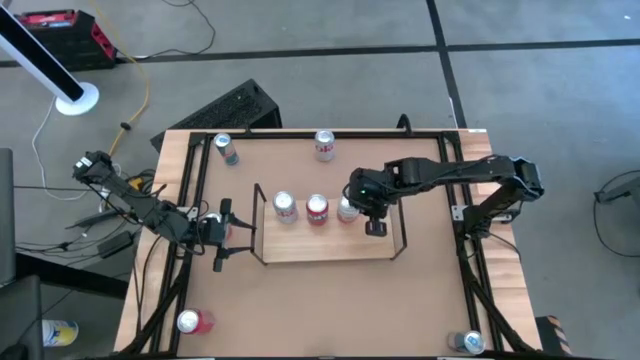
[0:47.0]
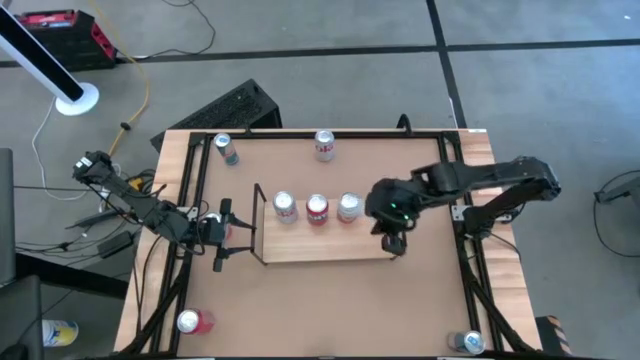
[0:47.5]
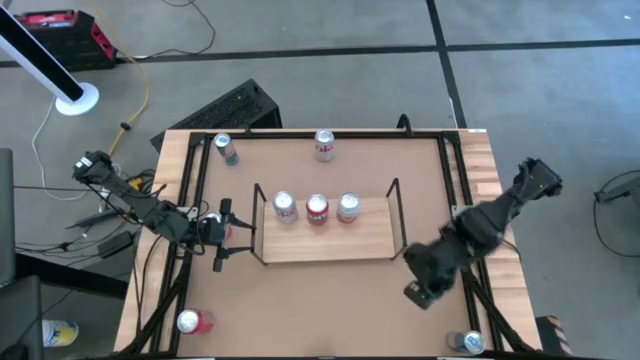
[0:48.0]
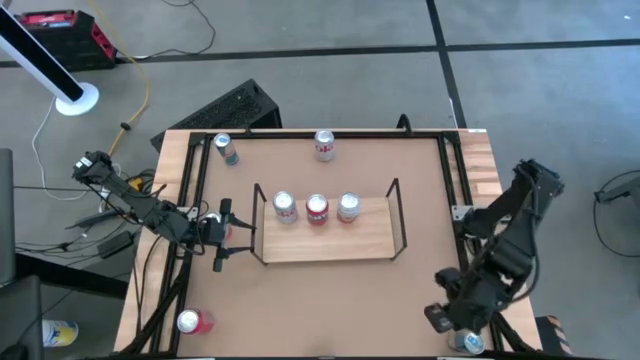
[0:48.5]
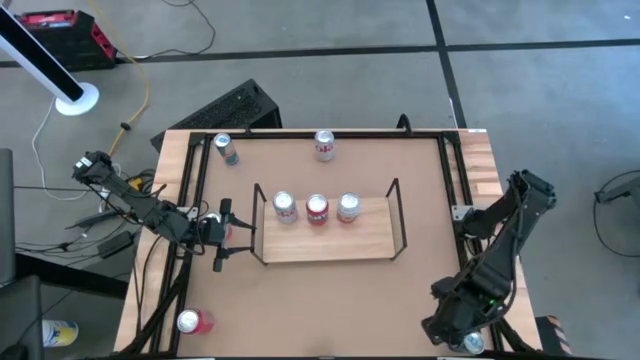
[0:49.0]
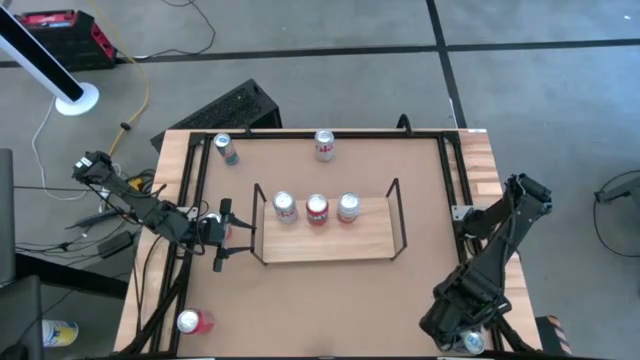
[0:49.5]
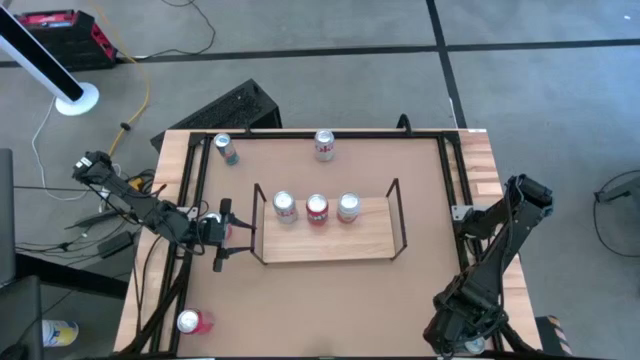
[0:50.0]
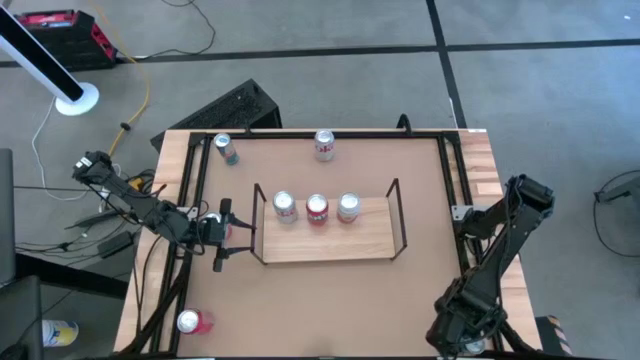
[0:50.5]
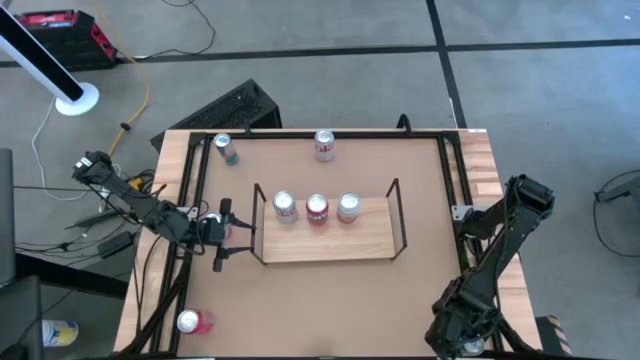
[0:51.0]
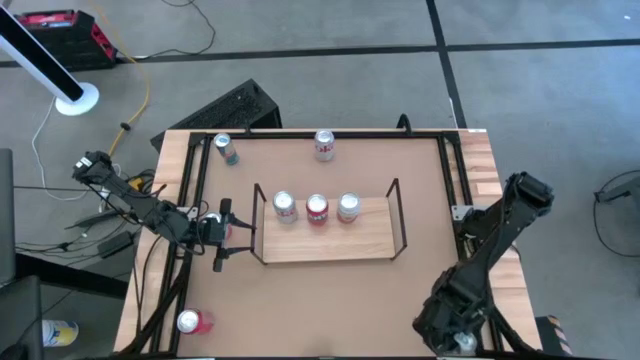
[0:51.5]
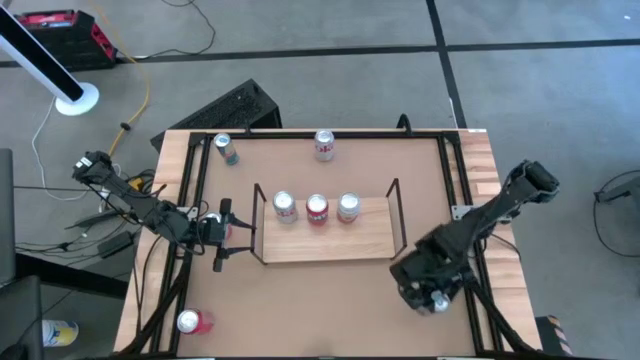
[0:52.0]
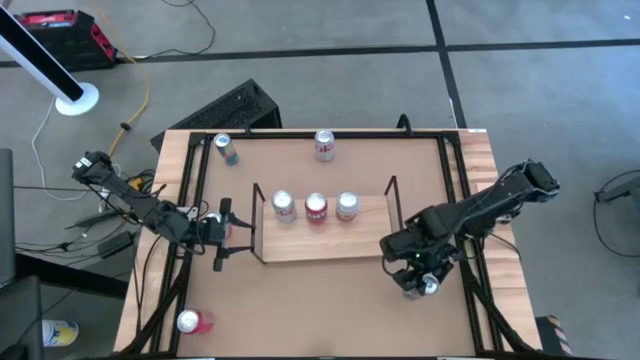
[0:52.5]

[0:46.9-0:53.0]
Task: Place canned beverage on shelf
Put the bottom blue soda can on the shelf aligned with the other pink soda can

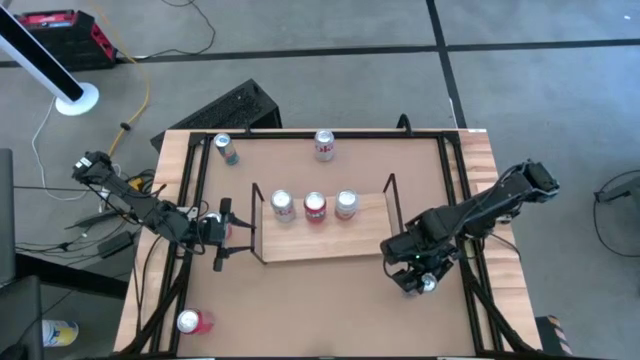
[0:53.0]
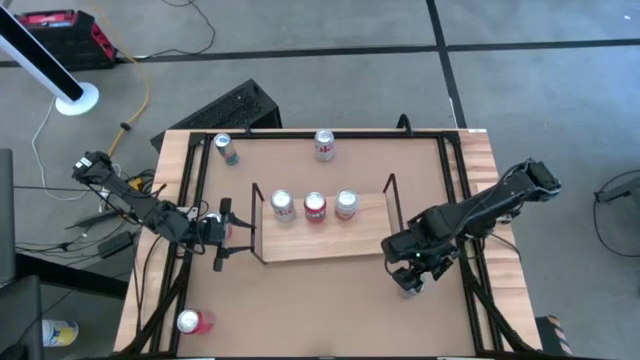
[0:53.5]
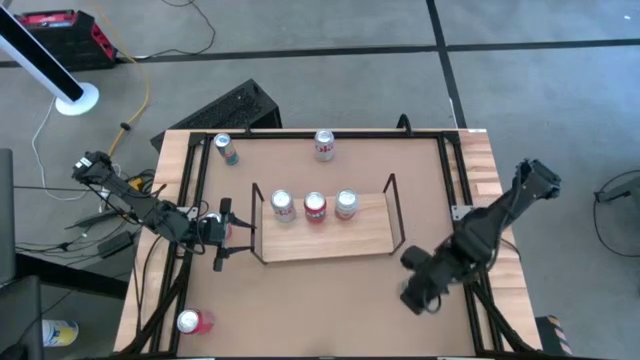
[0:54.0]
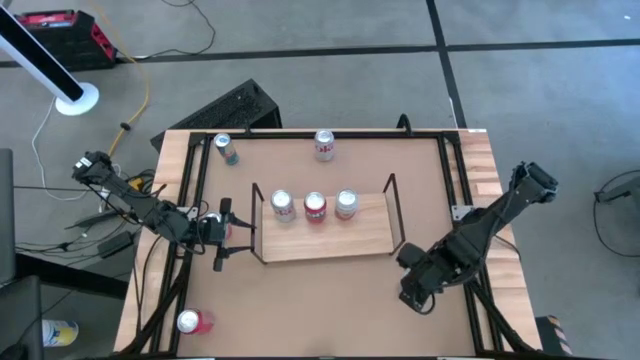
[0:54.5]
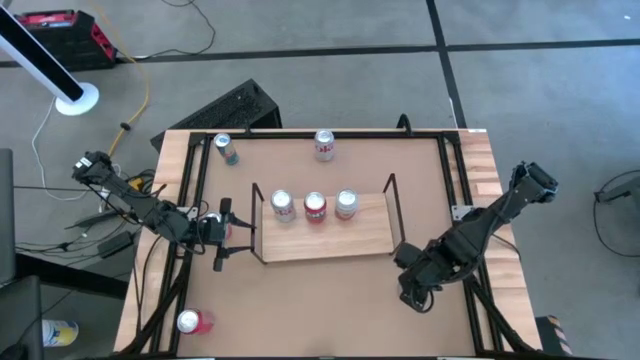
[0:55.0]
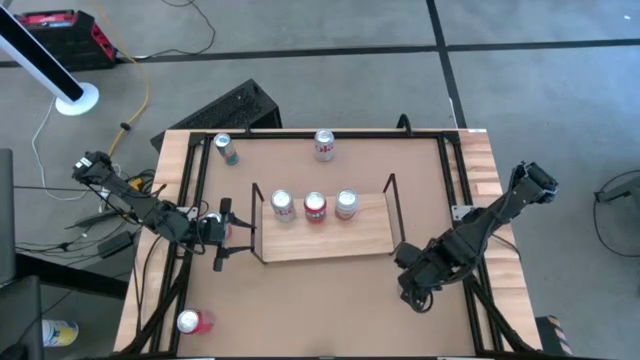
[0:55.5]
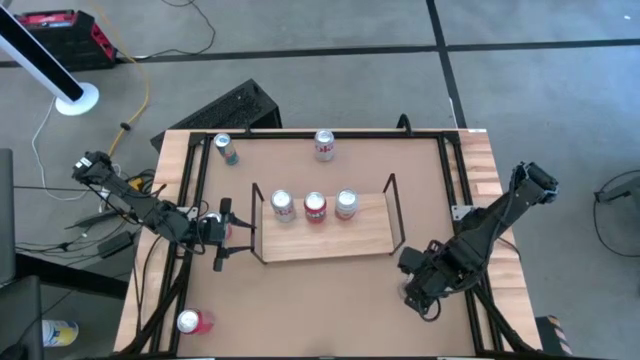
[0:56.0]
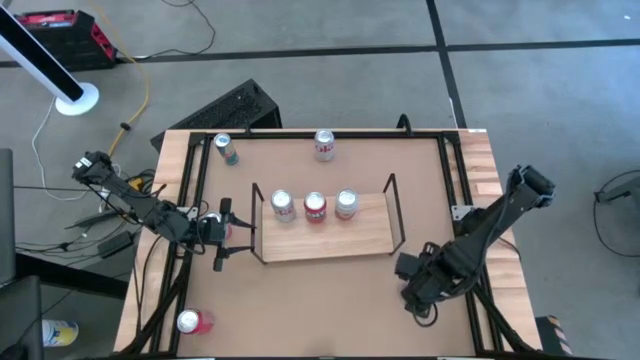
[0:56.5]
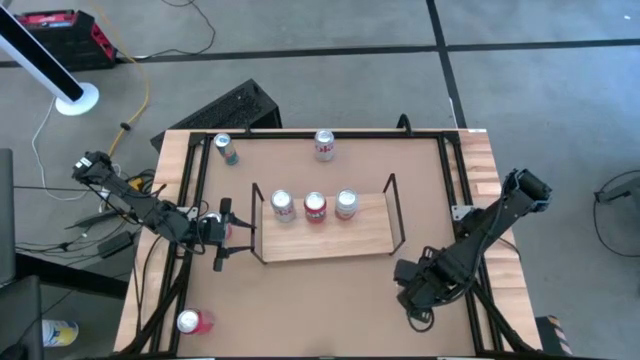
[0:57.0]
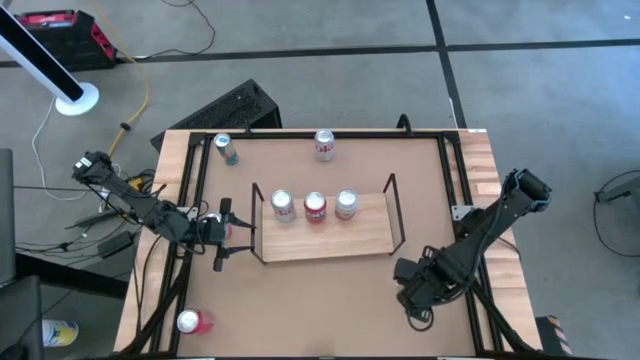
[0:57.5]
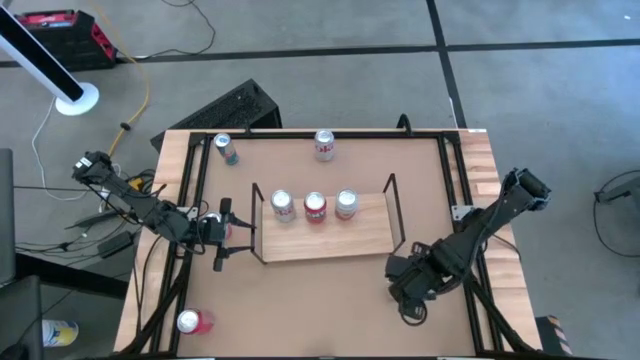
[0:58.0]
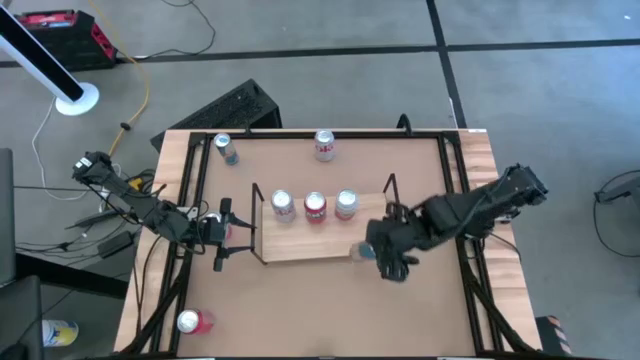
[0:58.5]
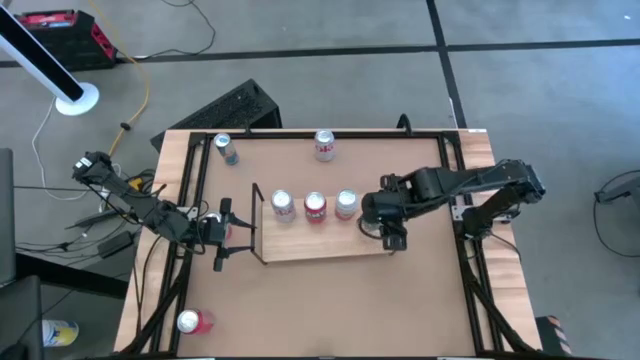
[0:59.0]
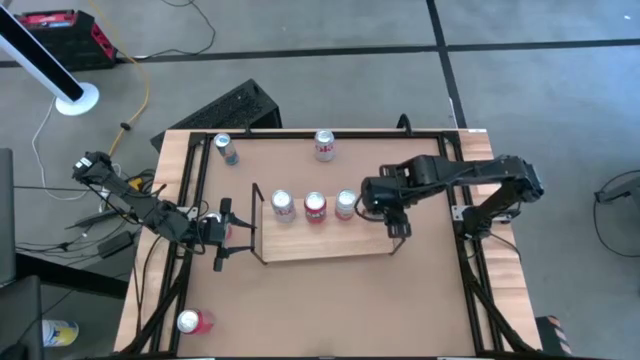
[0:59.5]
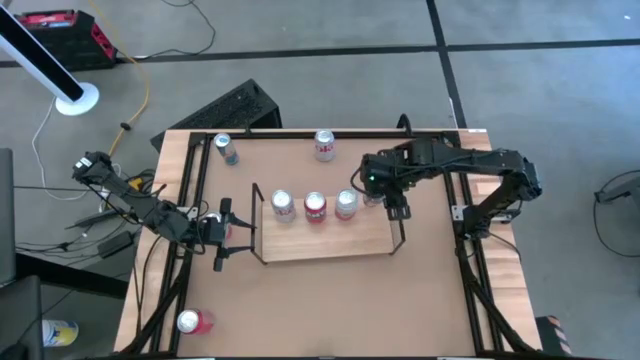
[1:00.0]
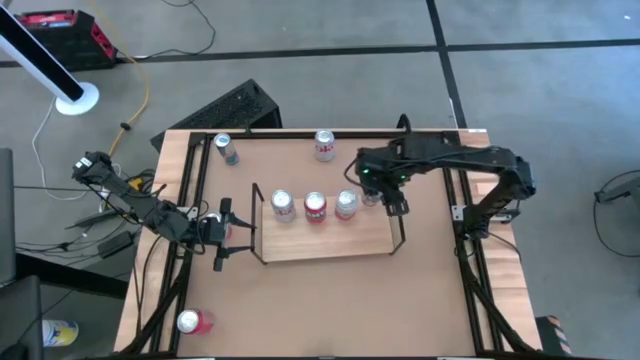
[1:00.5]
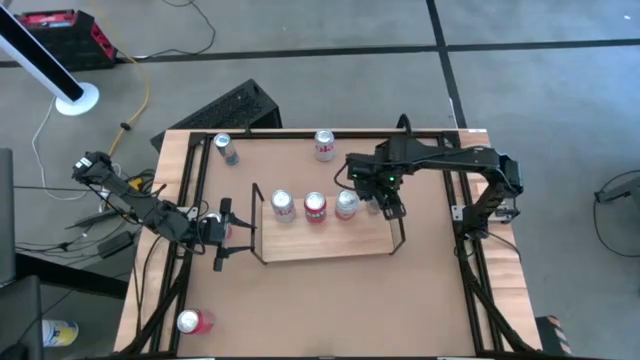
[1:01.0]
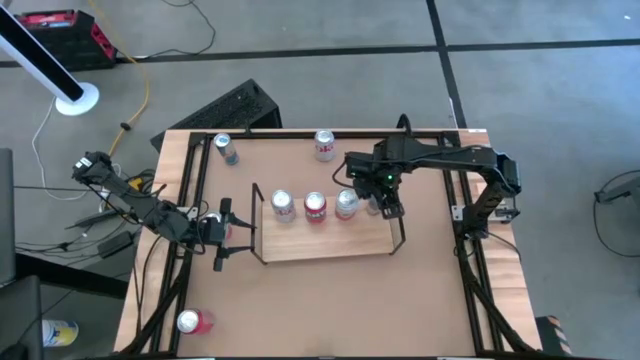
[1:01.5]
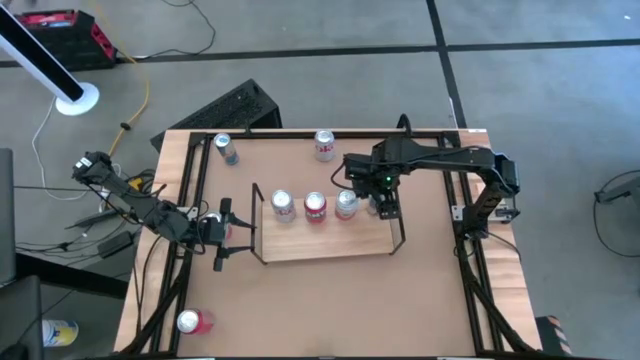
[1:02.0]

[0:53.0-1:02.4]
Put the bottom blue soda can on the shelf aligned with the other pink soda can

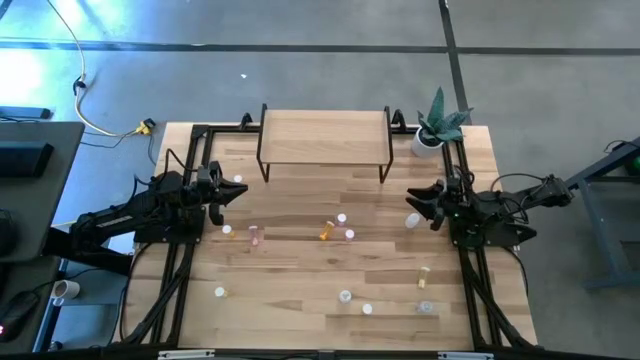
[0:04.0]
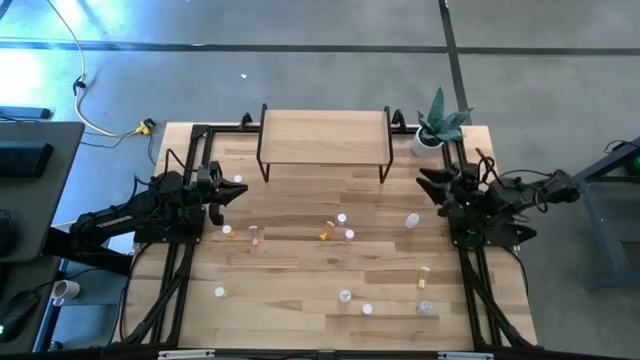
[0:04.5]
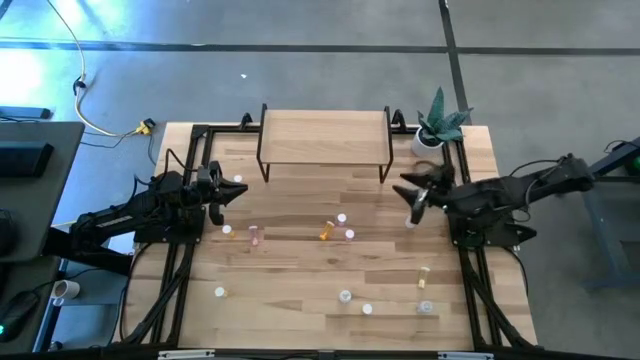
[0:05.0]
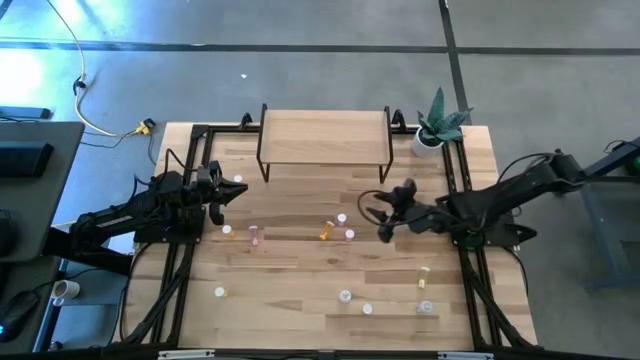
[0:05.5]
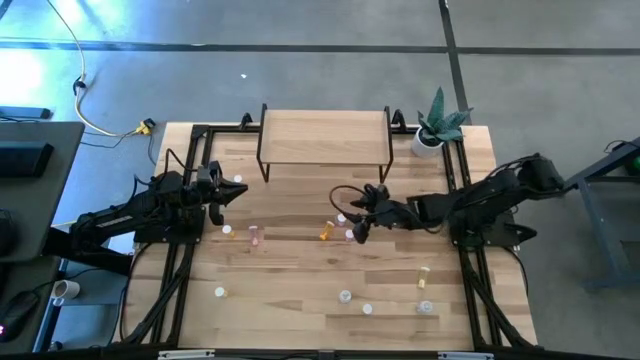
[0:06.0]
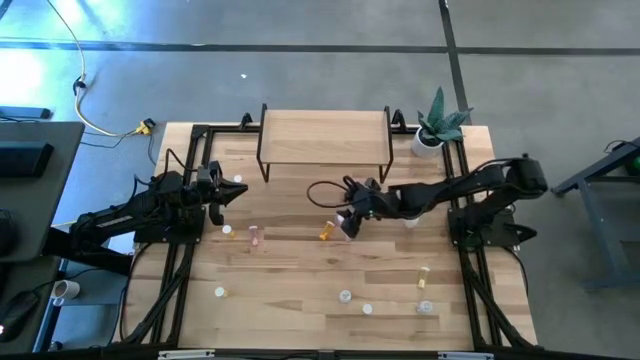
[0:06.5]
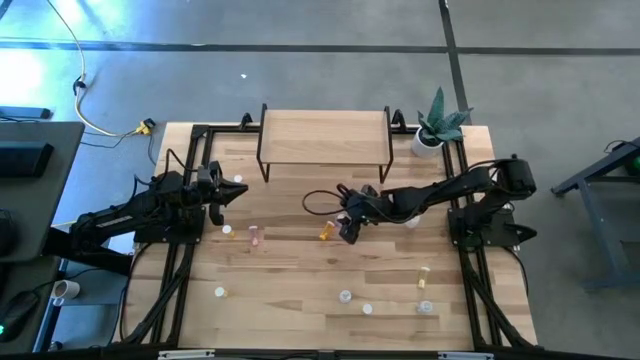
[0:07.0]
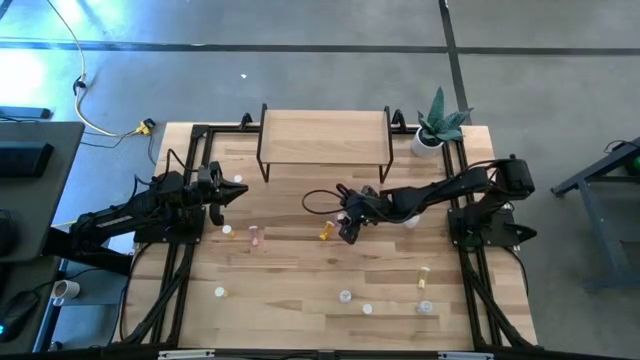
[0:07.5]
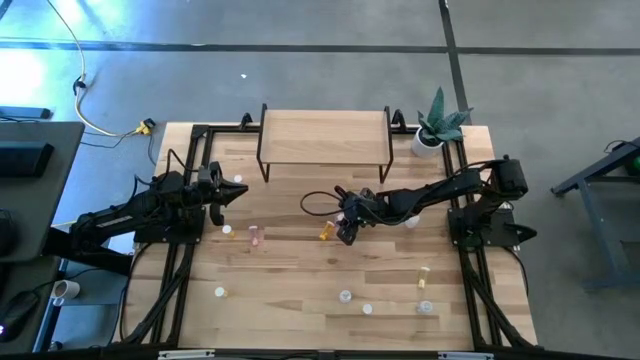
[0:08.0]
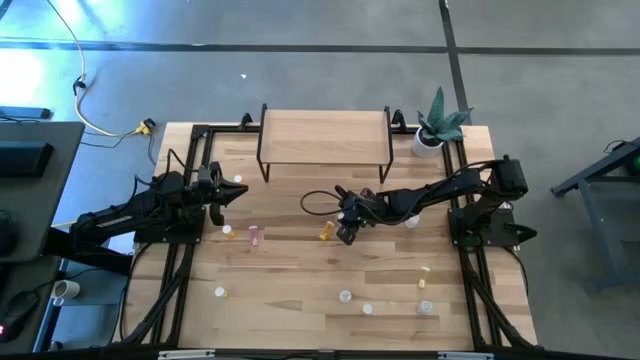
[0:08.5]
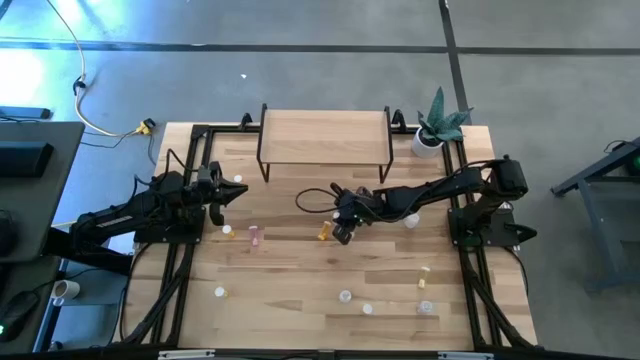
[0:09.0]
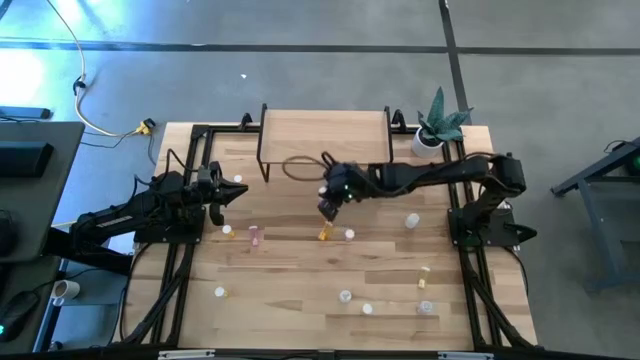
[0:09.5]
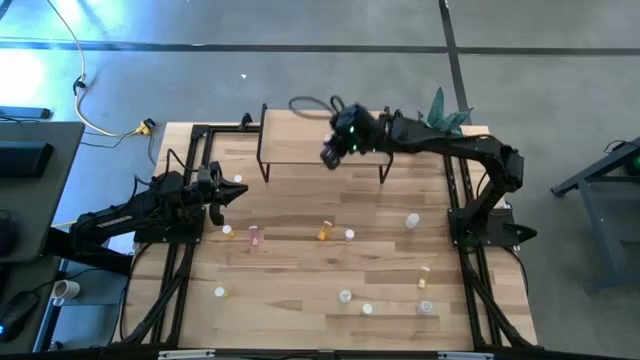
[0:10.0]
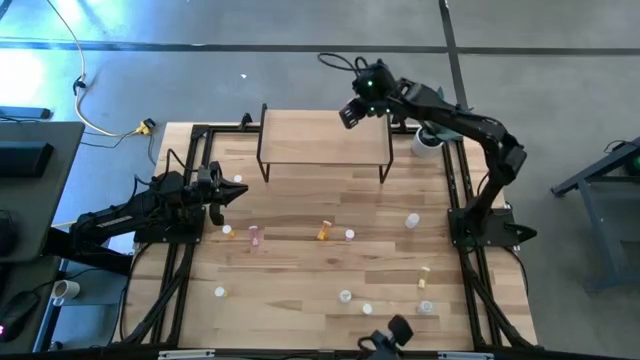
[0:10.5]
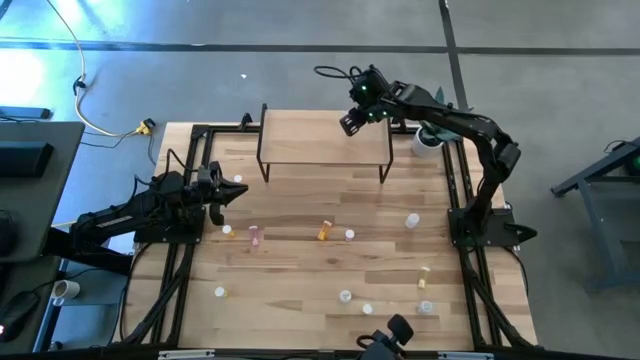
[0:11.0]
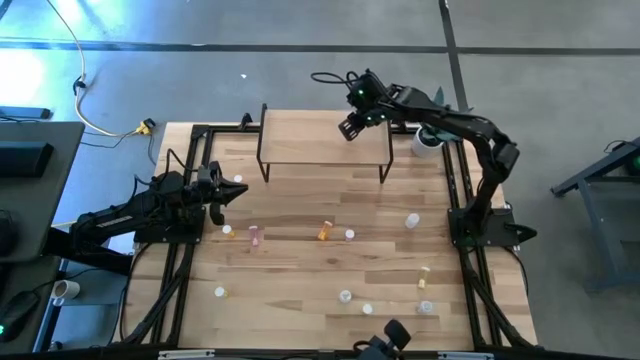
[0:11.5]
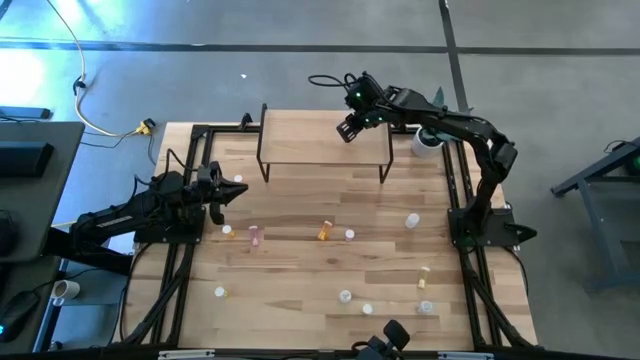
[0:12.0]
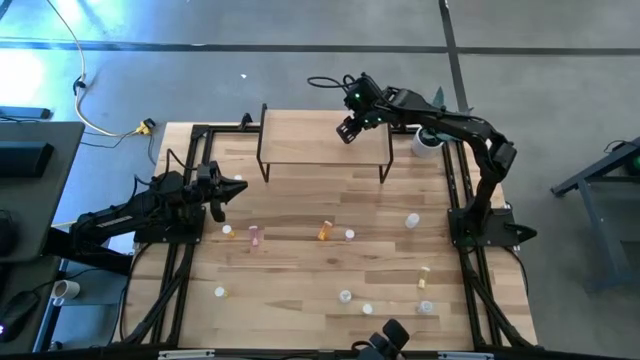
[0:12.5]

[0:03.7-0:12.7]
Task: Pick and place medicine bottles onto shelf by color
Put the top right pink pill bottle on the shelf
